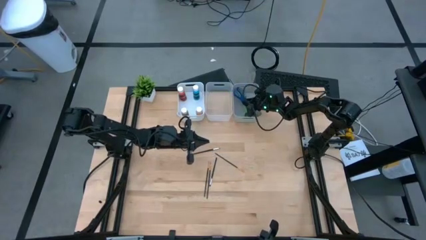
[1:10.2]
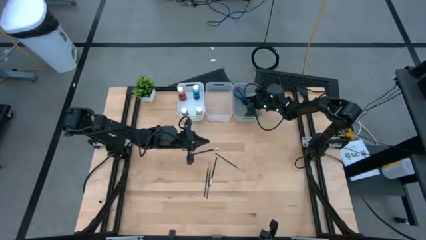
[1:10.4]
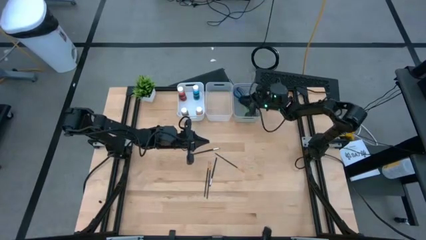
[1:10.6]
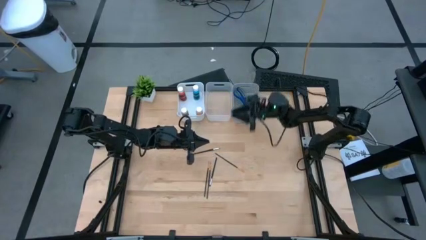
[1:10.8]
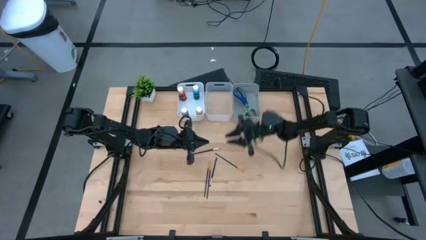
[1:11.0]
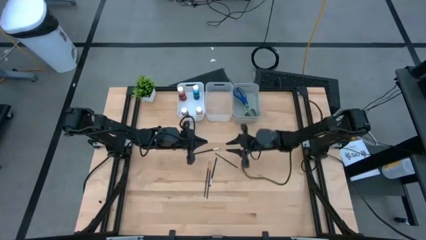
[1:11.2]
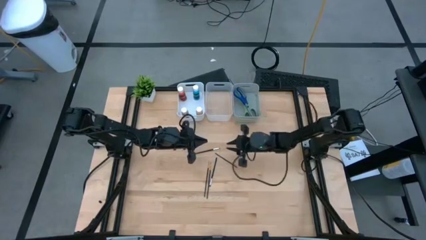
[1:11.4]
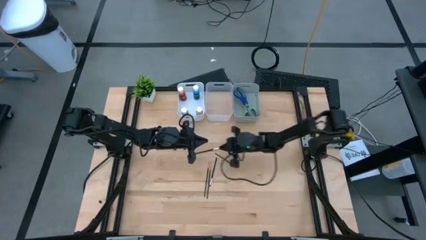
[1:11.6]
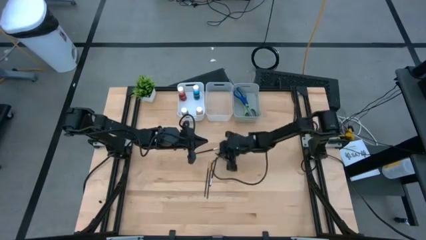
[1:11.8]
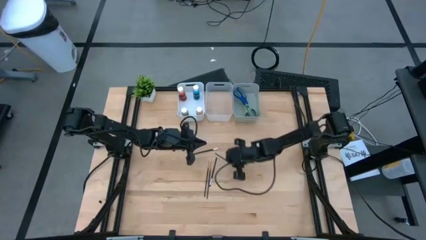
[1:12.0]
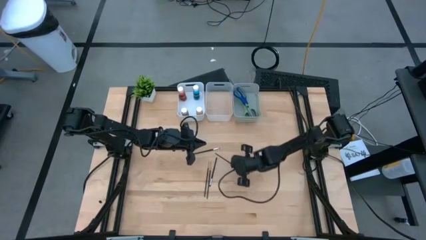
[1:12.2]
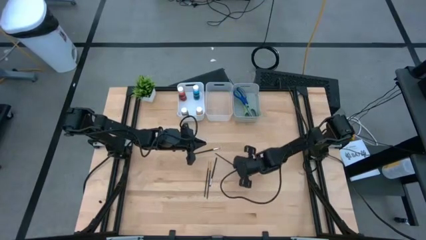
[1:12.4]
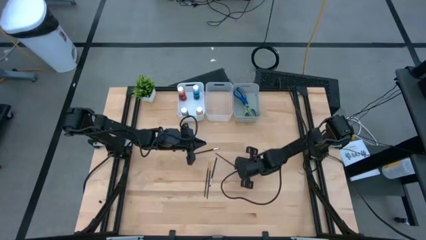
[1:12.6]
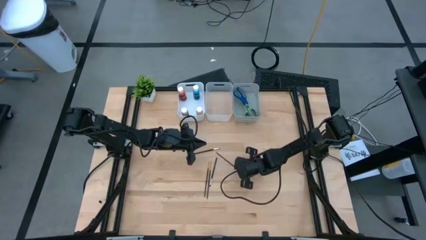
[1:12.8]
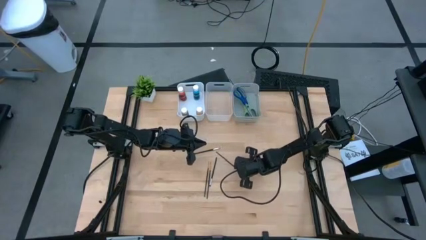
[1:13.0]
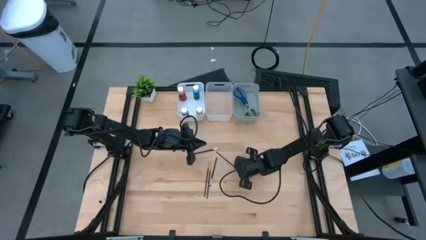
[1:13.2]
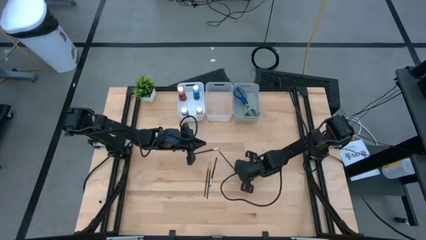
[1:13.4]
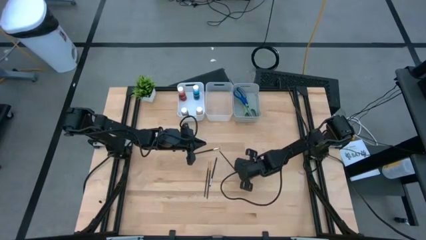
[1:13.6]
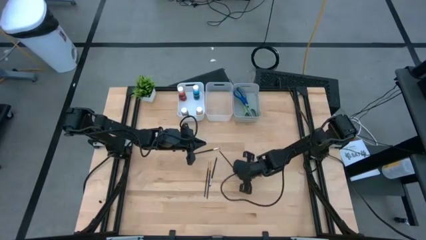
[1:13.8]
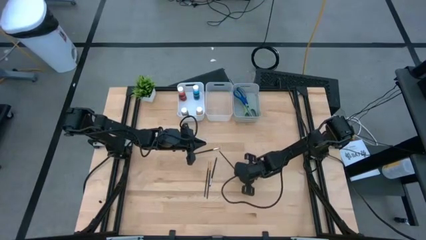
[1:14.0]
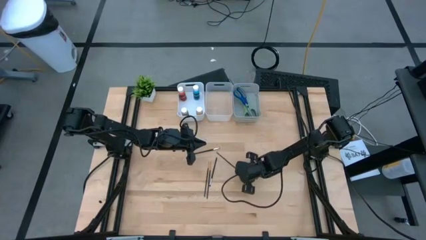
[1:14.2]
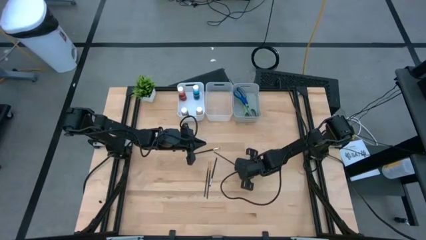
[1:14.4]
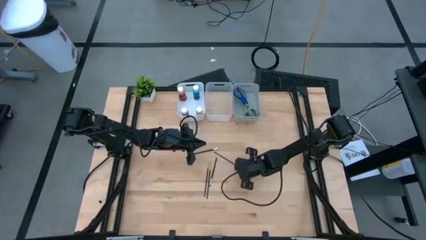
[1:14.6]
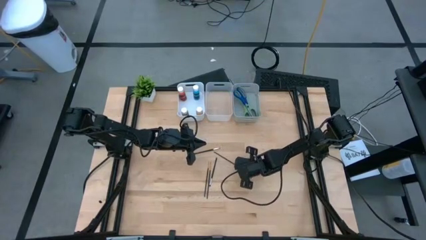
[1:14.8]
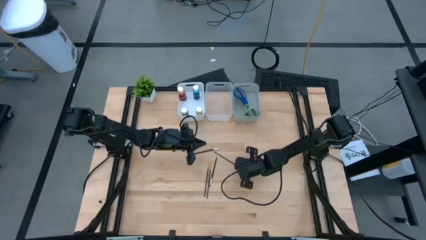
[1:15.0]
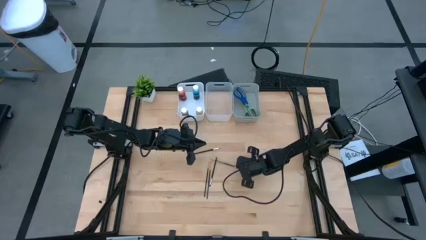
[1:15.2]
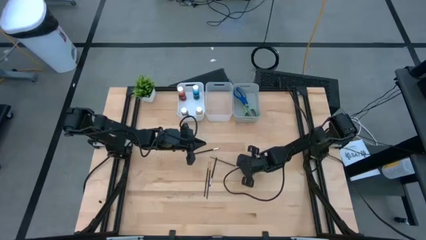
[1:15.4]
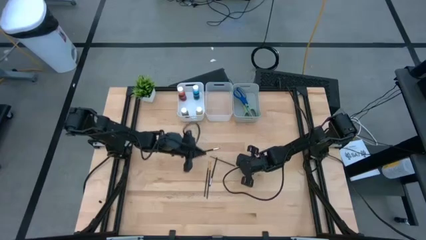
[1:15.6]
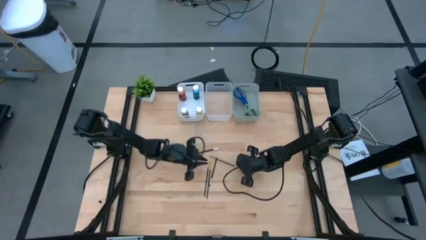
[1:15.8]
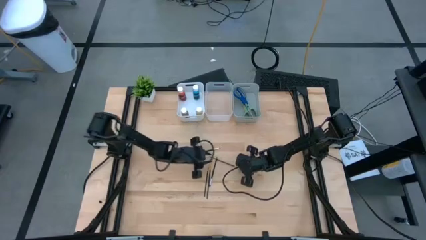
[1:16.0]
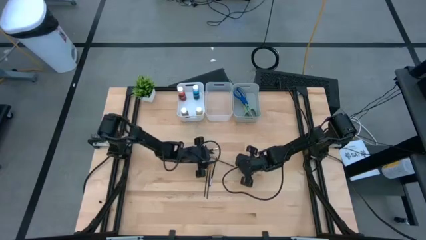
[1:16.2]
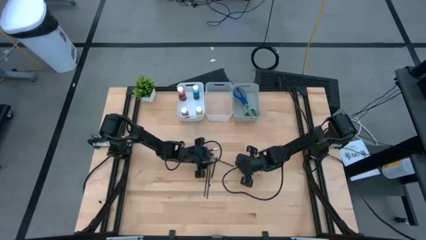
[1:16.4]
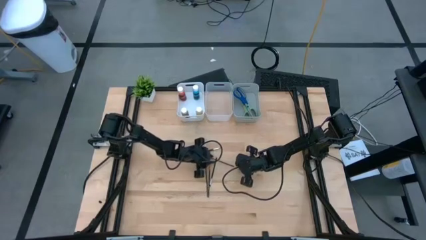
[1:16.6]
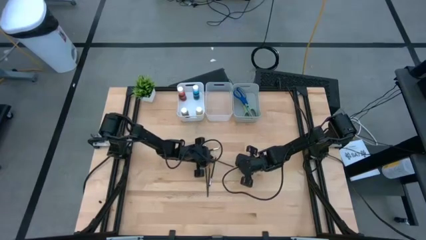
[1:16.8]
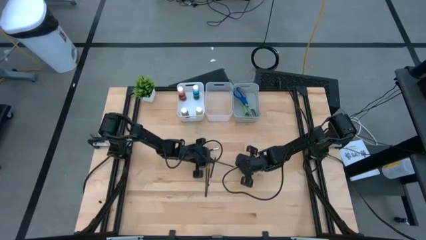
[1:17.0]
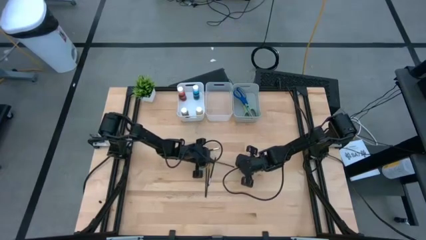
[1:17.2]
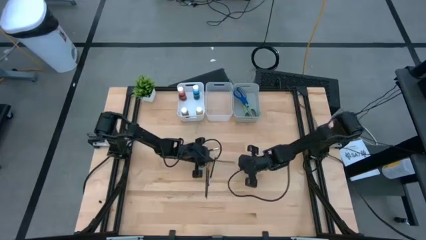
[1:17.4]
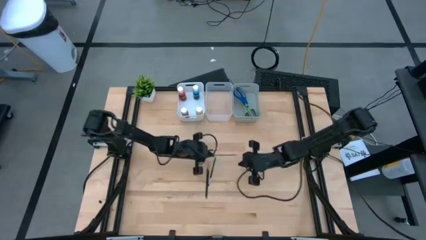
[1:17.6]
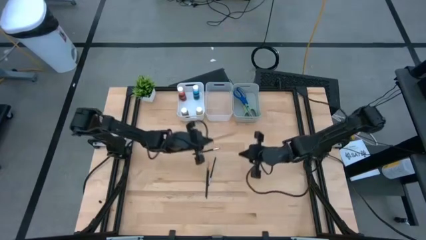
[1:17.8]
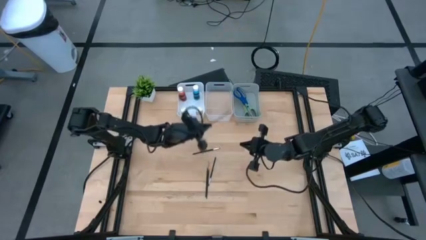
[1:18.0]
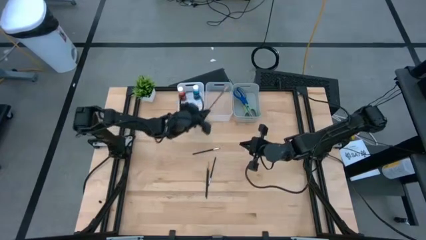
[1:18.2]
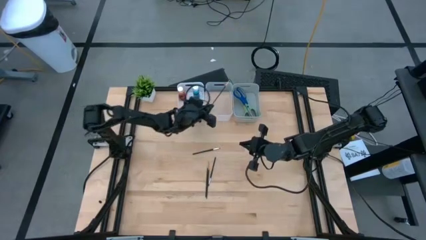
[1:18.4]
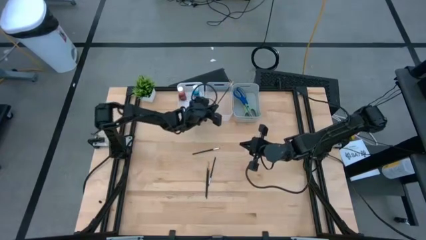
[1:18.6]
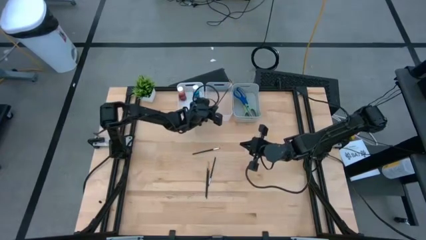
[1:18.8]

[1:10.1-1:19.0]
Task: Pick & Place Paint Supplies
Put the golden paint brush into the transparent bin

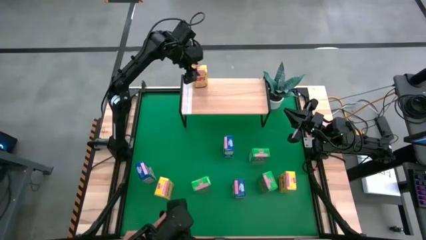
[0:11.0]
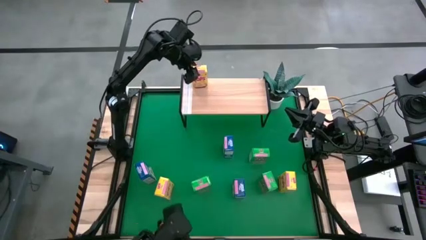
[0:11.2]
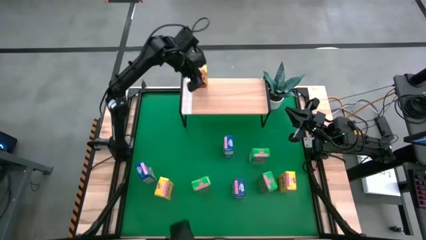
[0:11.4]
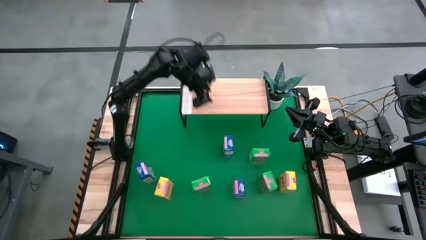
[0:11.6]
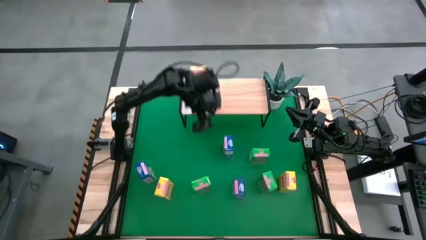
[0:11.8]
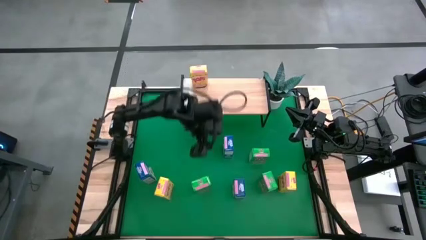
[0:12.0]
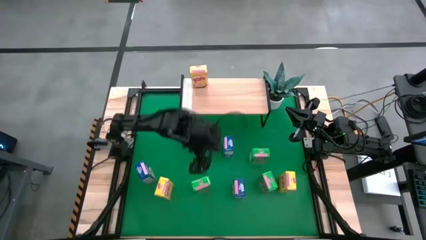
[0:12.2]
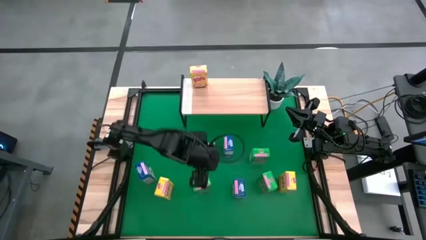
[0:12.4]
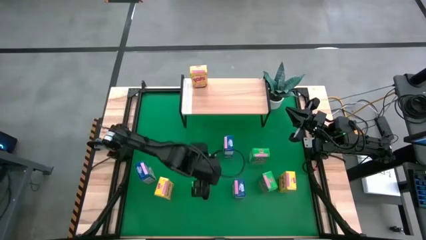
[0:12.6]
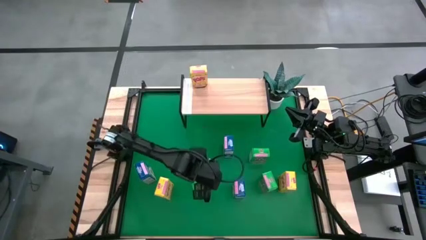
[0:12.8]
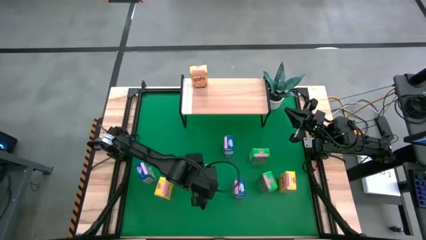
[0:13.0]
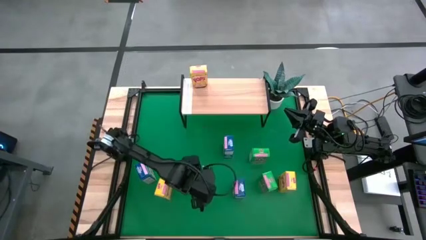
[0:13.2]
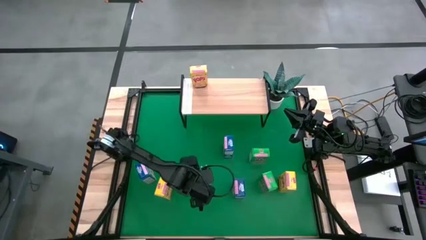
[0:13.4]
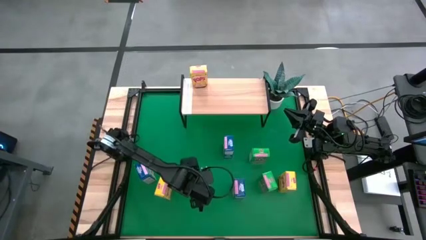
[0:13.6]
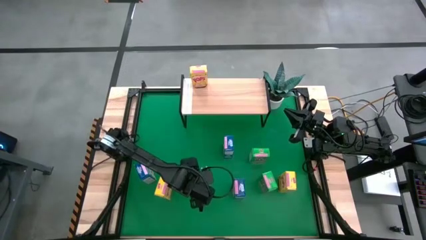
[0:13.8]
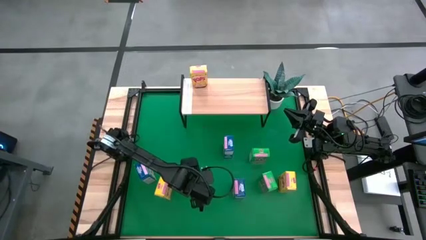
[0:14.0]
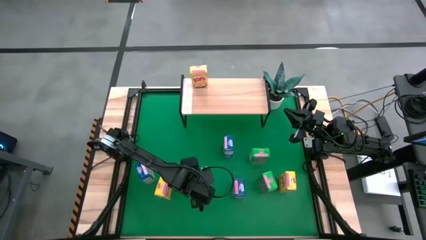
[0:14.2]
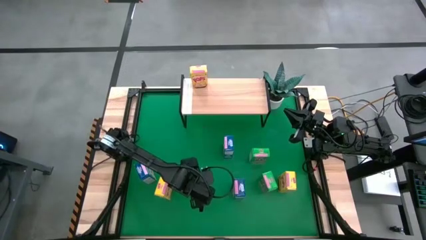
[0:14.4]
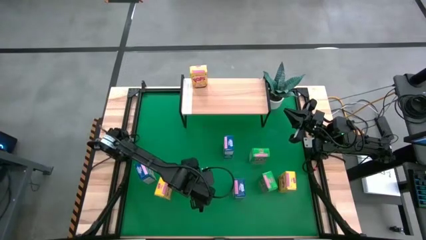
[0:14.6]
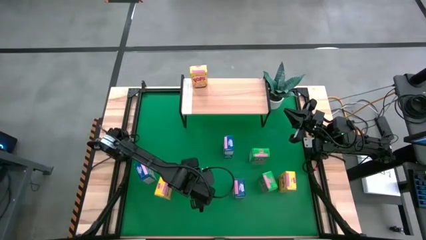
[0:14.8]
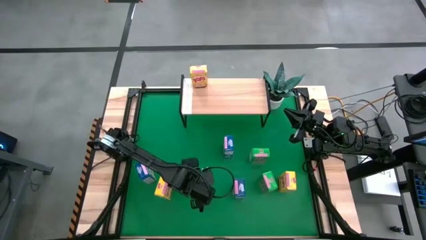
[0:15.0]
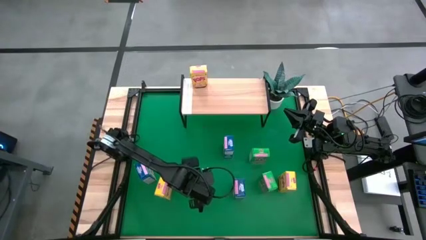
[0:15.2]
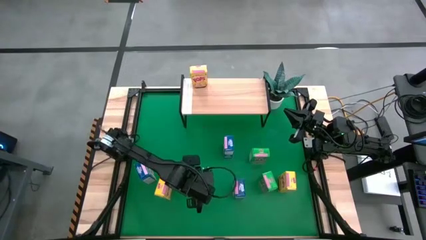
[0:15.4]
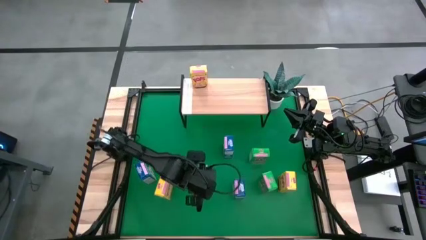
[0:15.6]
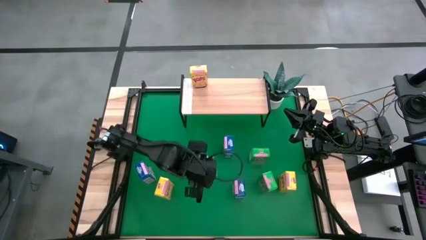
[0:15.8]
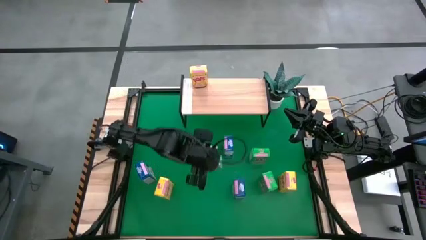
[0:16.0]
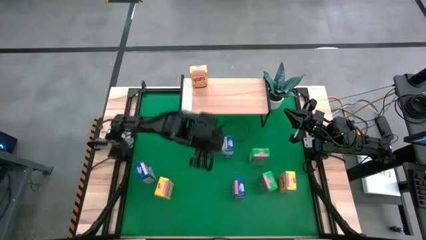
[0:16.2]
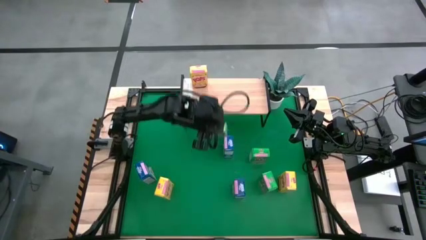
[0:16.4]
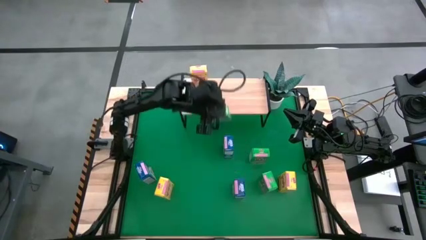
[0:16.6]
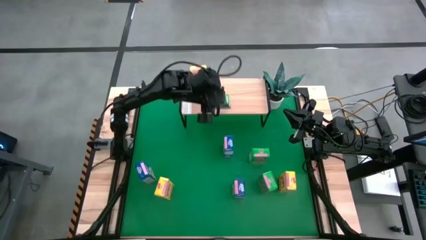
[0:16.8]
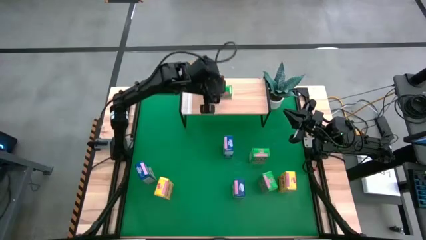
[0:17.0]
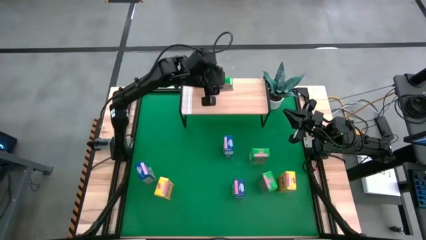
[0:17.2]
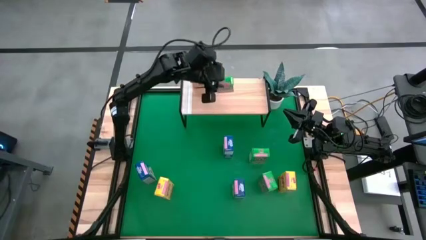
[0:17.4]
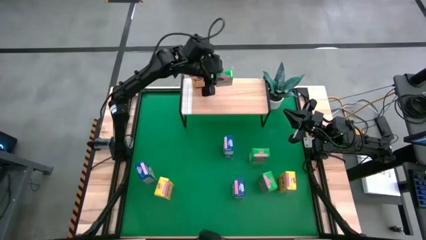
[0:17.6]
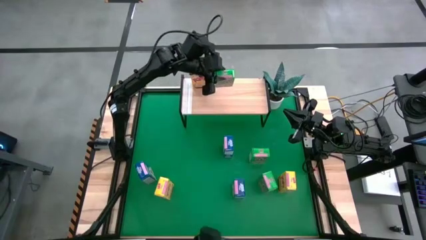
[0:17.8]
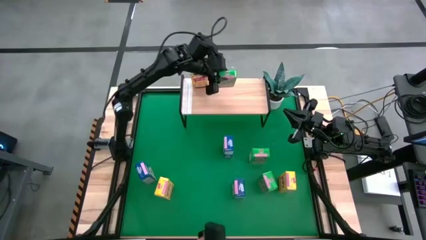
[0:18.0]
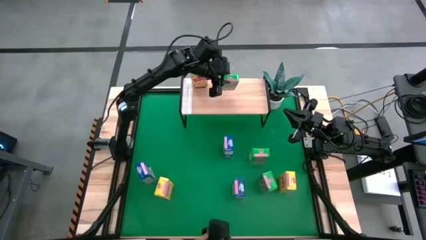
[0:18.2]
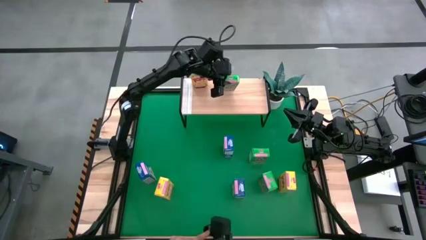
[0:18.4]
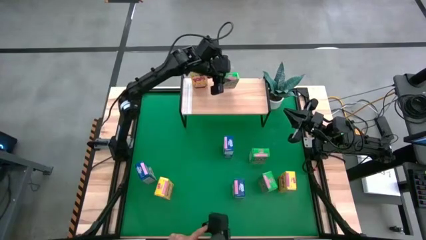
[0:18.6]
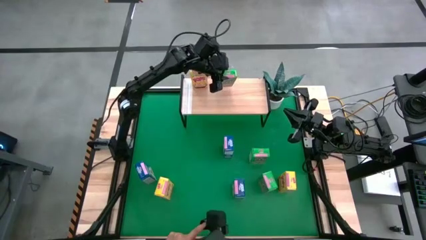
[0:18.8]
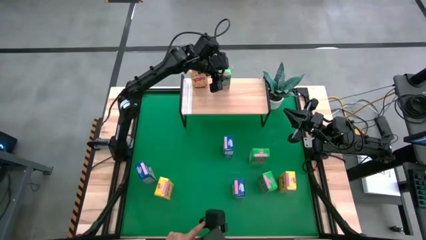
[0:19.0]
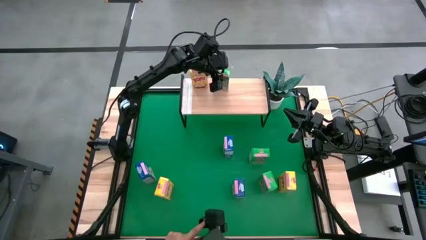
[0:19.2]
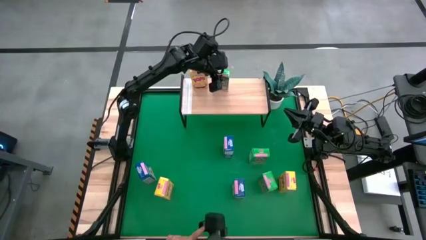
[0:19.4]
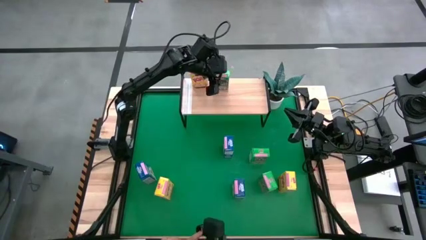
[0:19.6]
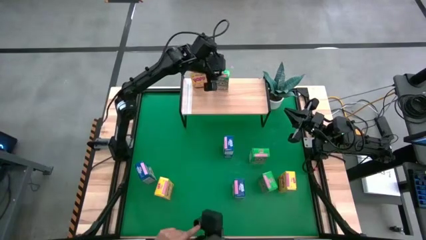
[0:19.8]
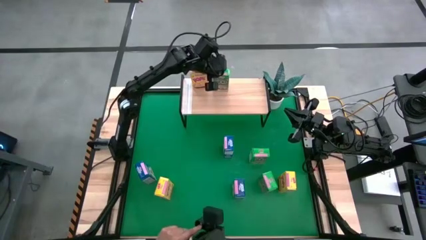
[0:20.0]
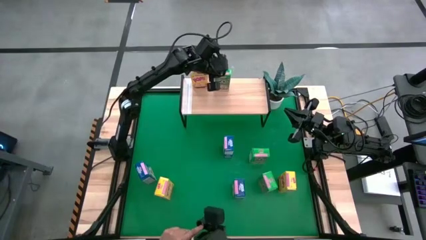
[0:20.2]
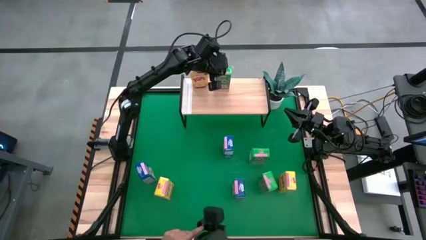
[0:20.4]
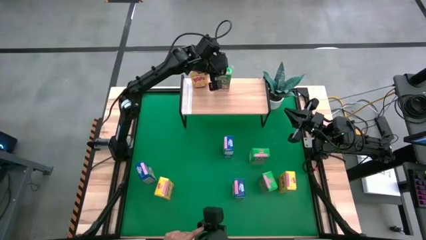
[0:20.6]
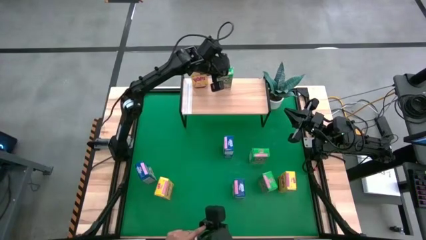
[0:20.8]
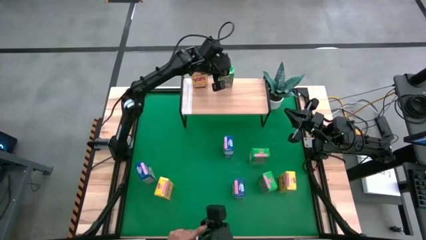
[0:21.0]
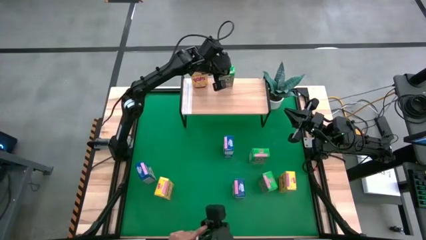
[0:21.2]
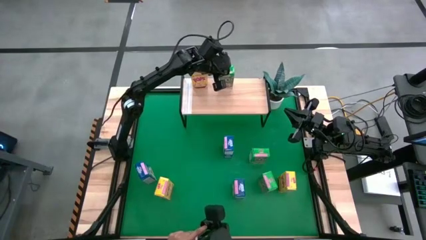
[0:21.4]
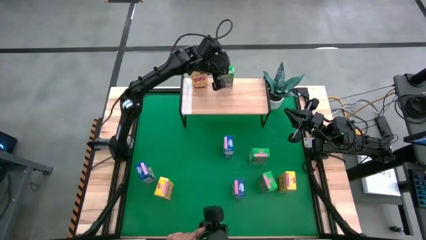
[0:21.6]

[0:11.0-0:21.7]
Task: Stack cereal on shelf
Put the left green cereal box on the shelf
